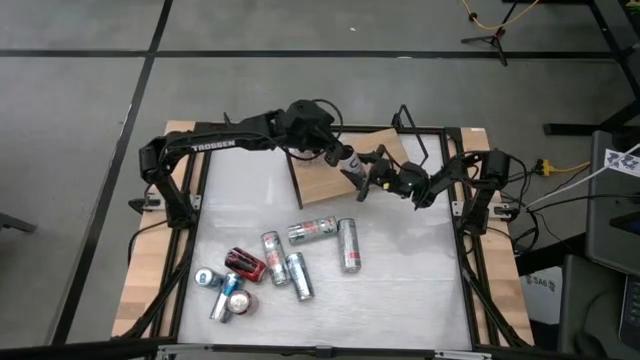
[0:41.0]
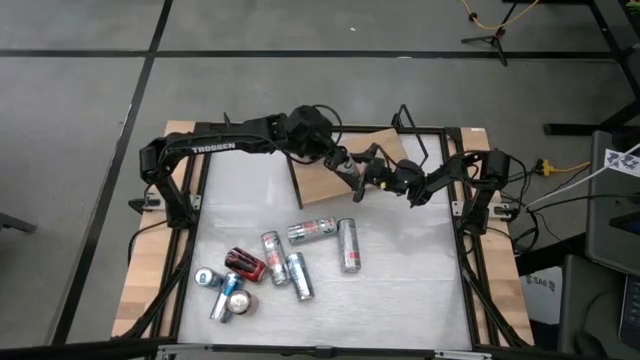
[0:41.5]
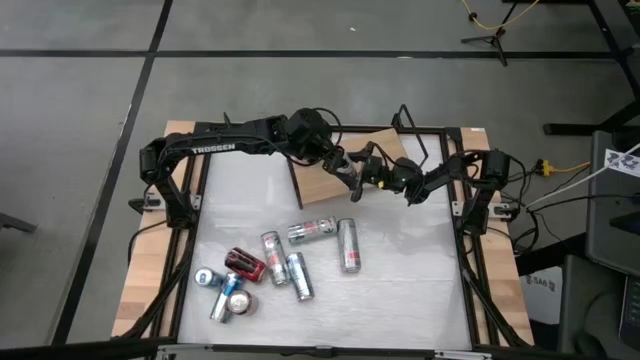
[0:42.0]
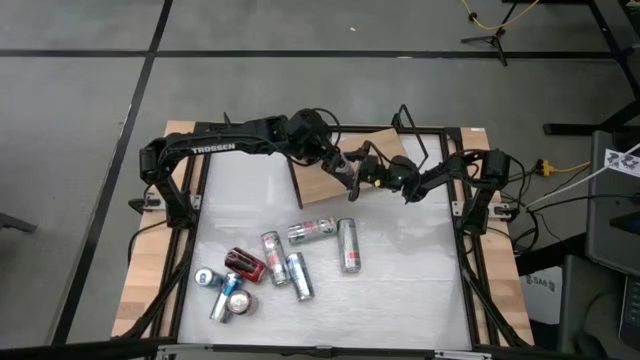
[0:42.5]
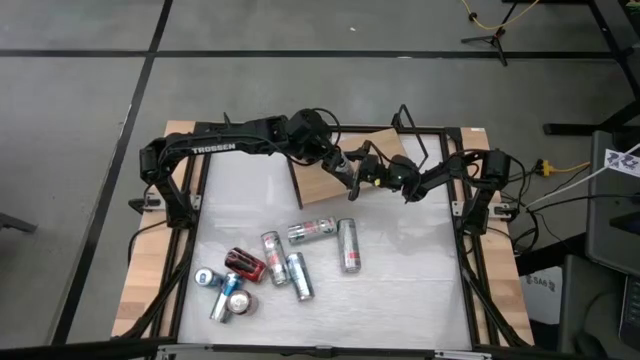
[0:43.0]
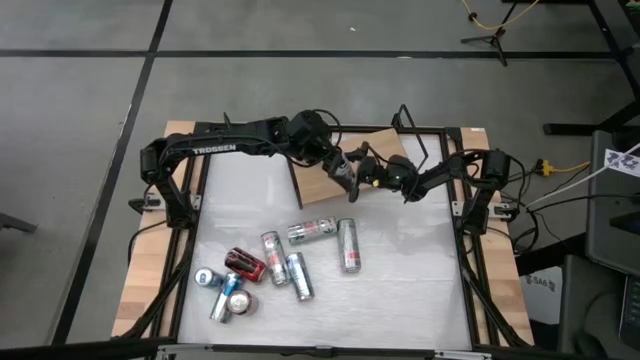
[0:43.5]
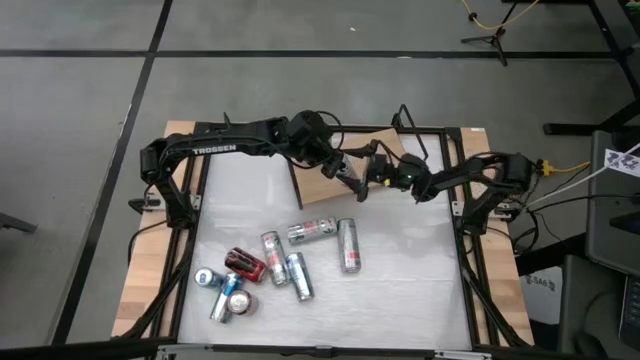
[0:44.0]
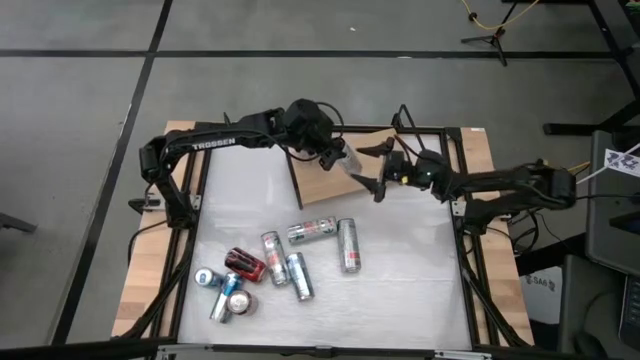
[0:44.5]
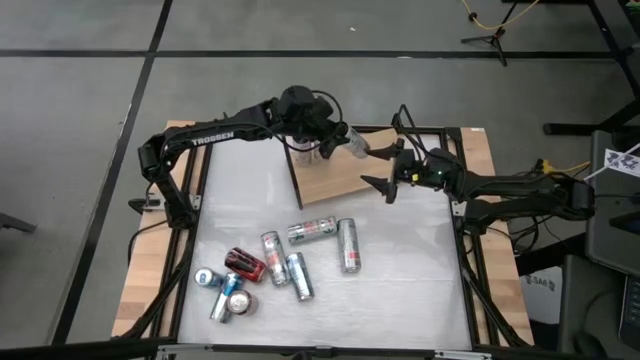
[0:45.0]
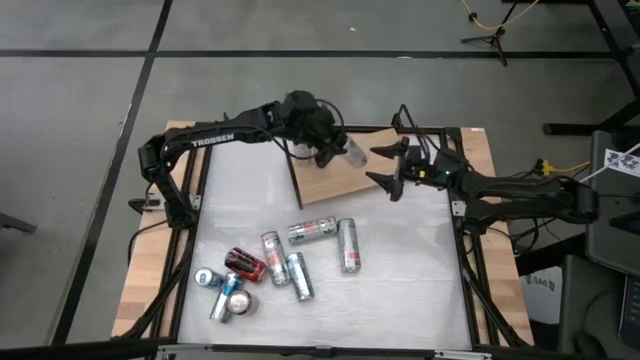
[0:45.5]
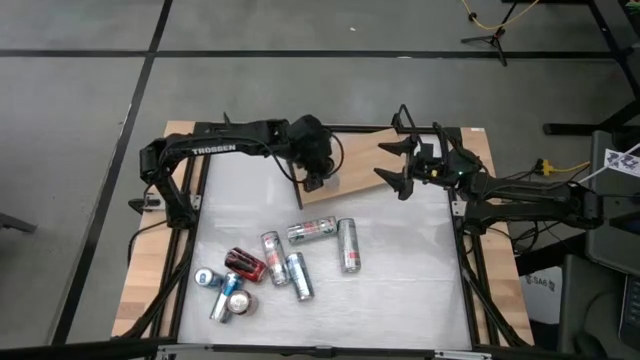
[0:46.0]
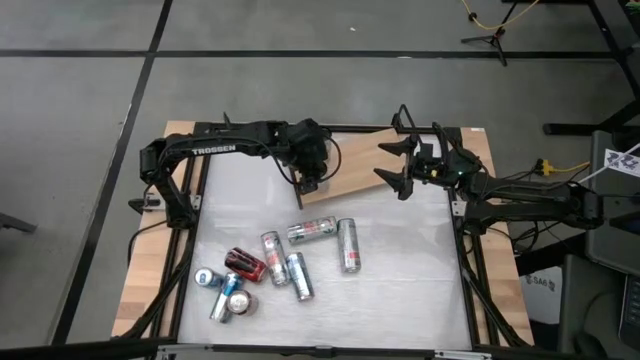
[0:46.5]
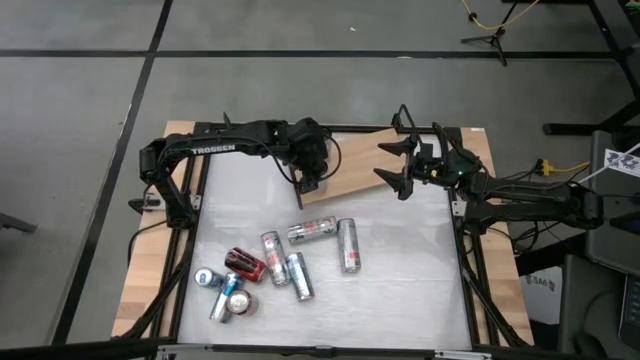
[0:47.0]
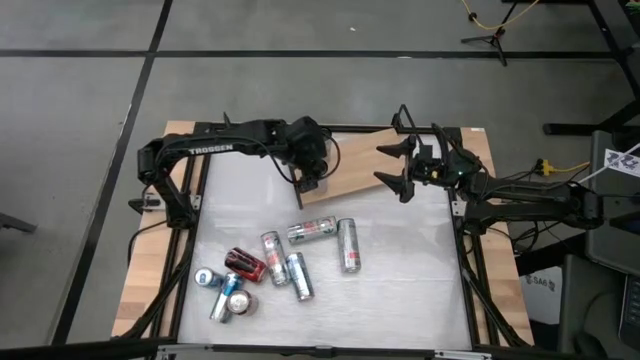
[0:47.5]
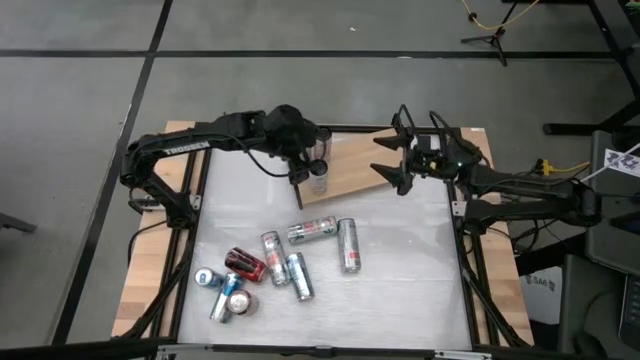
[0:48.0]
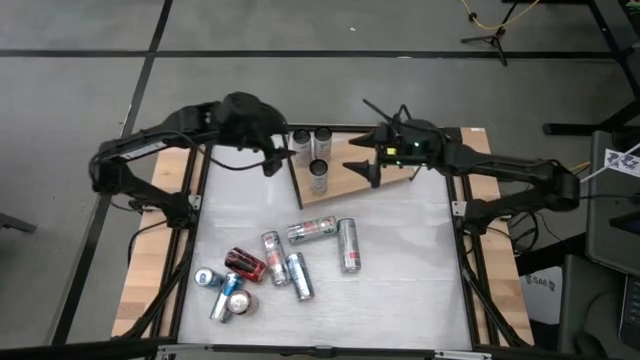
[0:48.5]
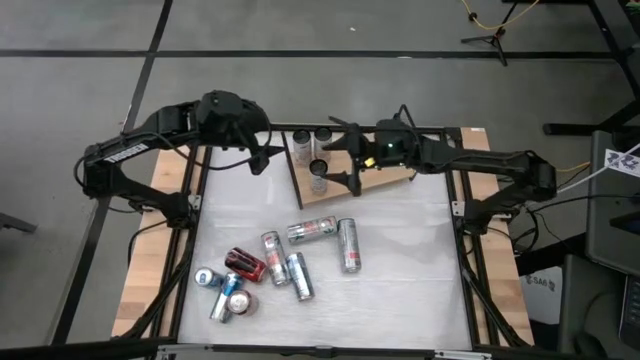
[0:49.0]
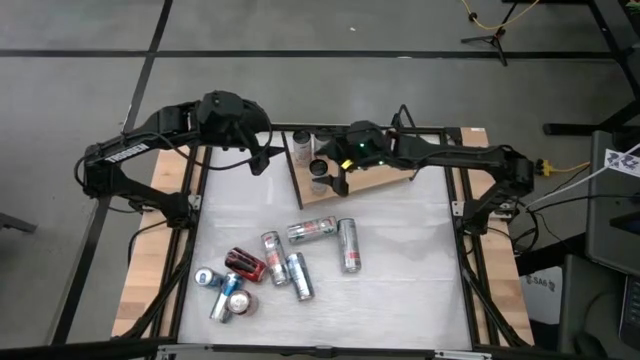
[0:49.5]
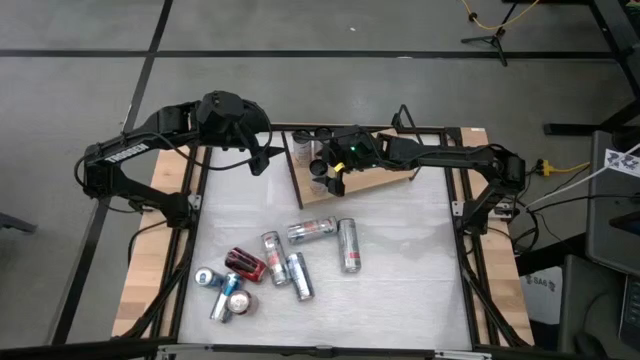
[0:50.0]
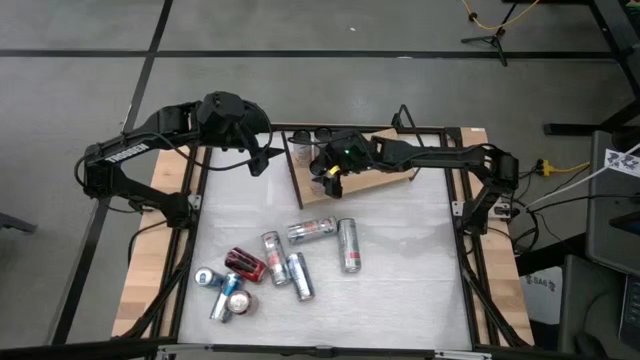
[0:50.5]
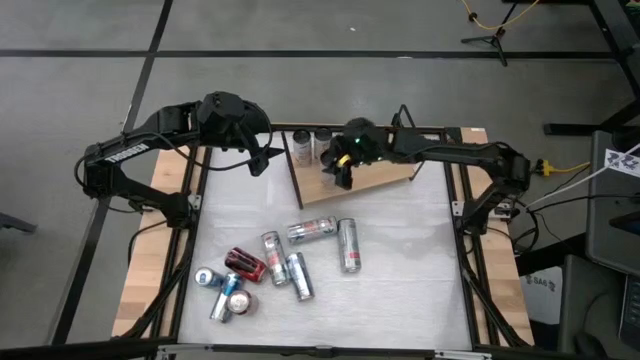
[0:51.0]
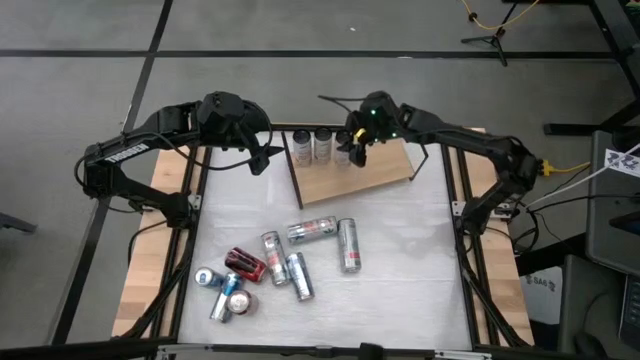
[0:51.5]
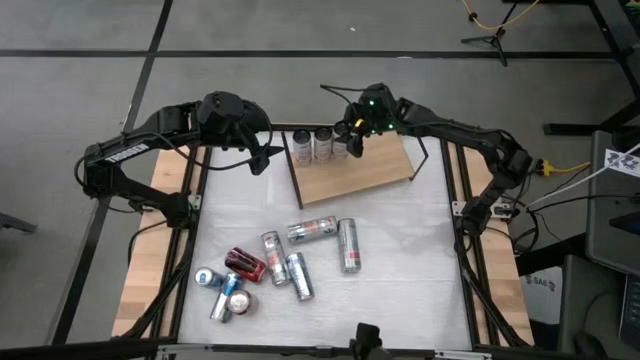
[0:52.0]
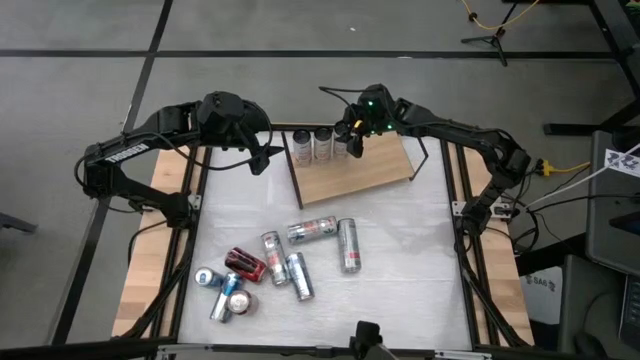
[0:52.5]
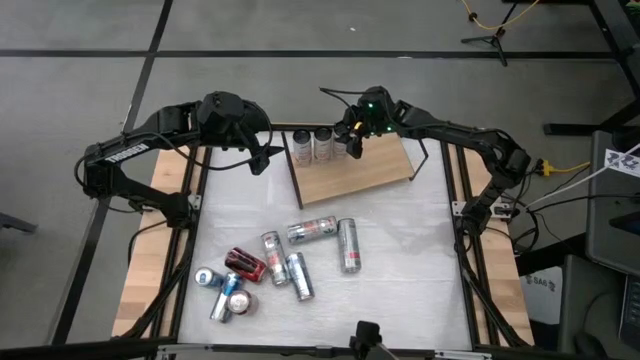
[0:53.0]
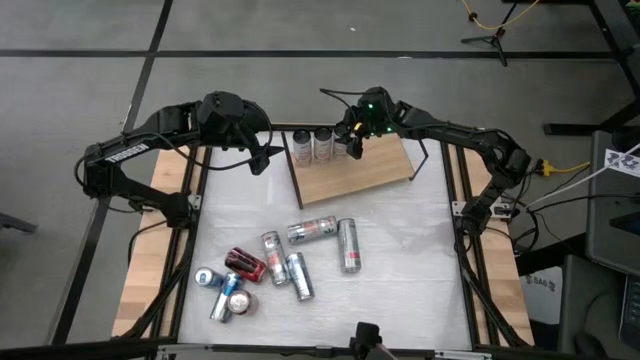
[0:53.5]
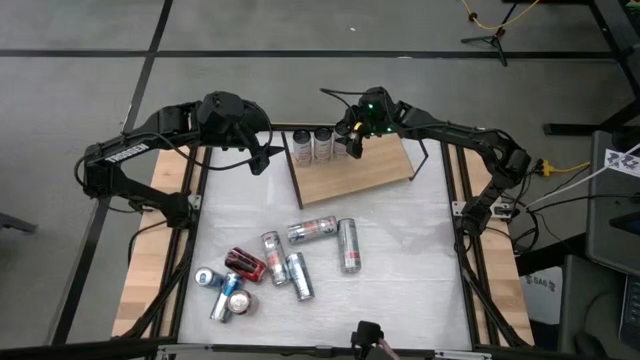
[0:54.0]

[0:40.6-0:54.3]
Task: Place canned beverage on shelf
Put the white pink soda can on the shelf aligned with the other white pink soda cans

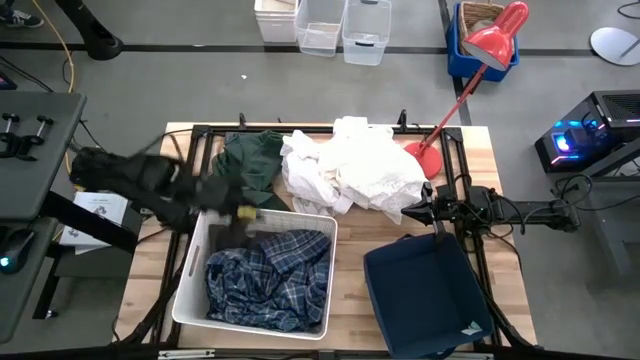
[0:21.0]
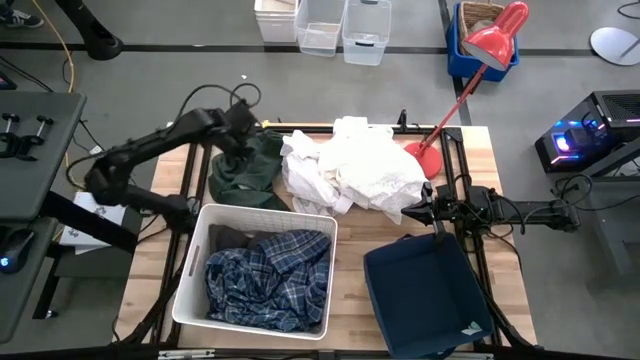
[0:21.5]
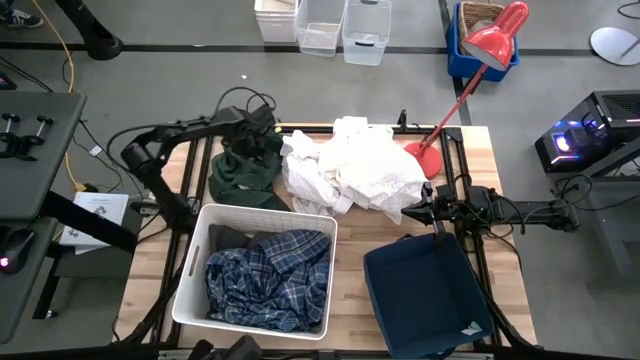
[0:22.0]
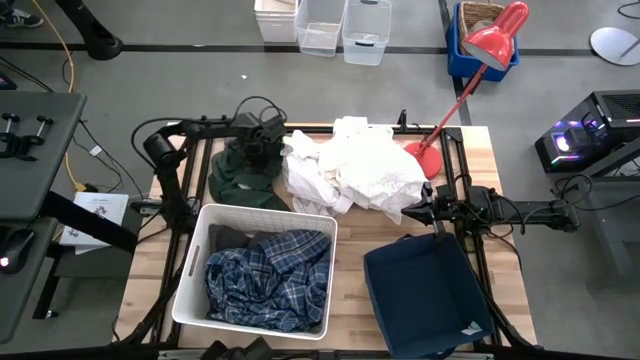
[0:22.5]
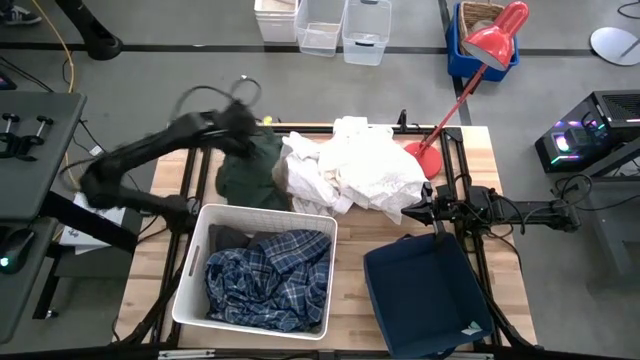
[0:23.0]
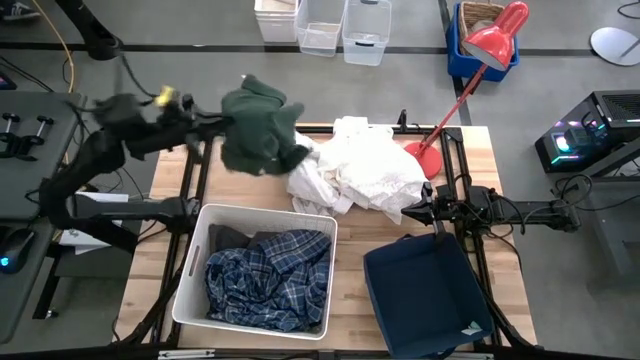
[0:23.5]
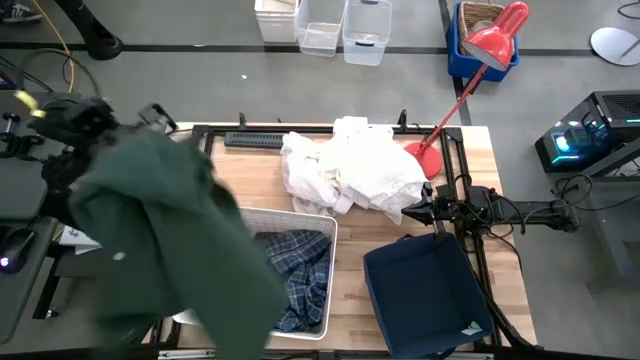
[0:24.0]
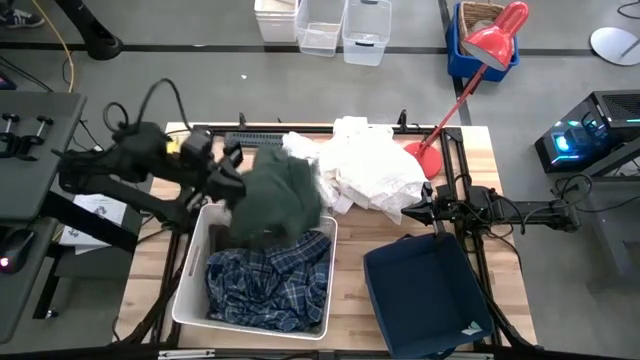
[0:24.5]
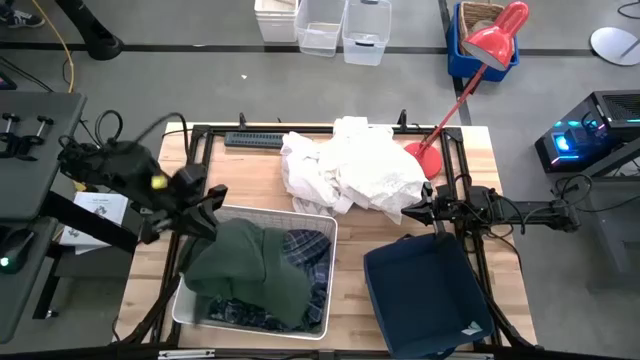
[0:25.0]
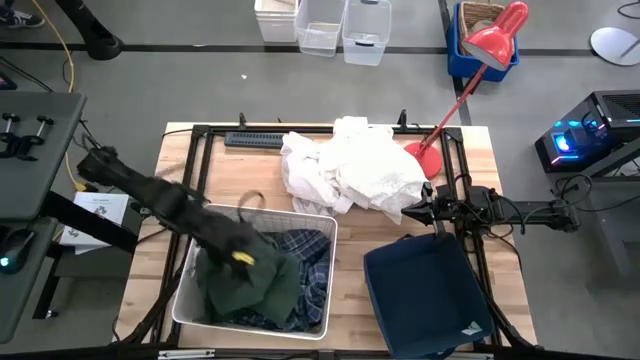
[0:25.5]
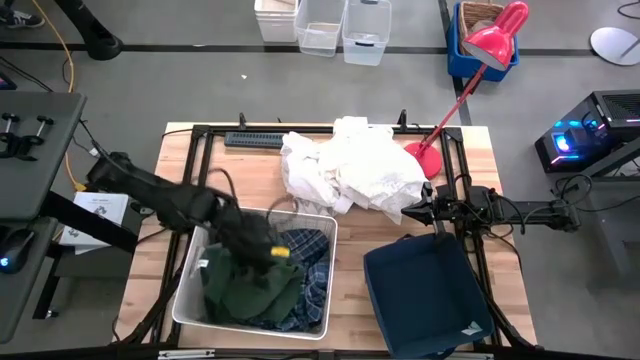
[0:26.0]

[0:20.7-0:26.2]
Task: Sort clothes
Put the green shirt into the white bin

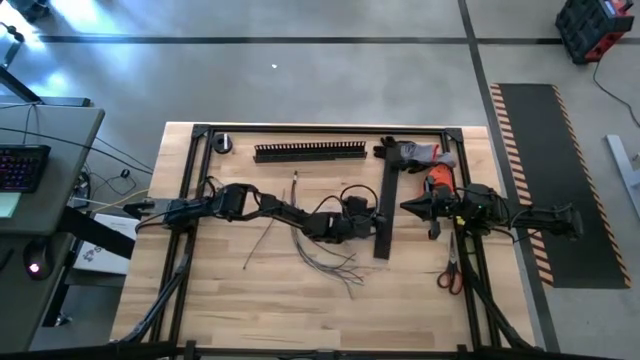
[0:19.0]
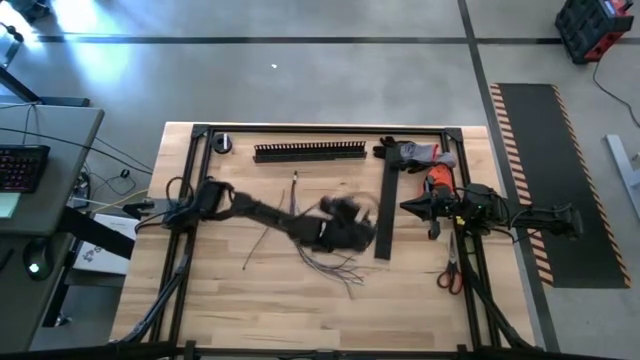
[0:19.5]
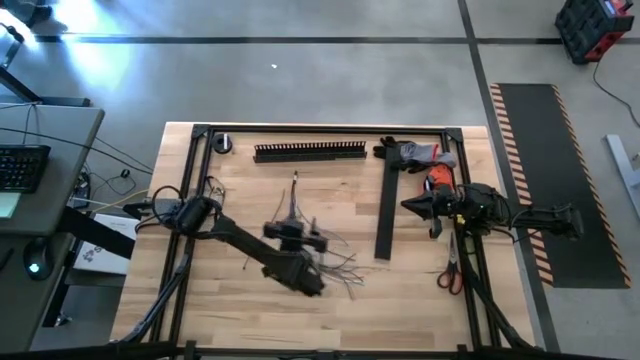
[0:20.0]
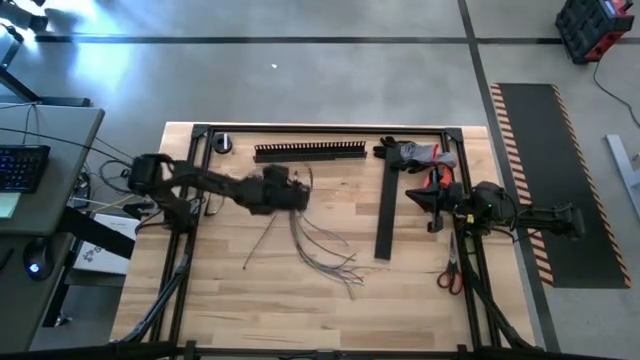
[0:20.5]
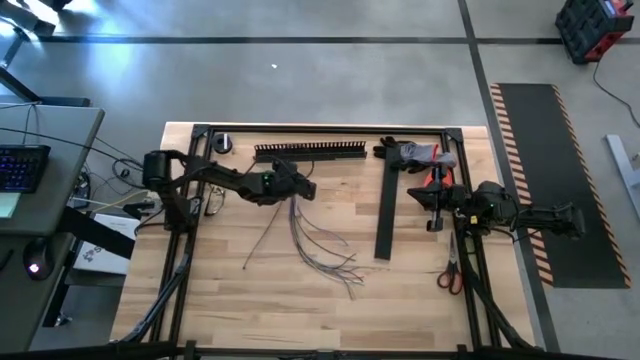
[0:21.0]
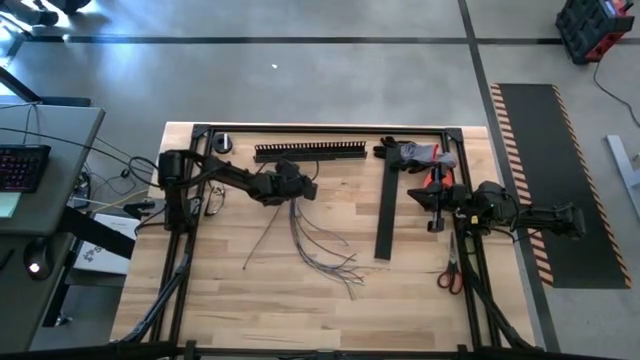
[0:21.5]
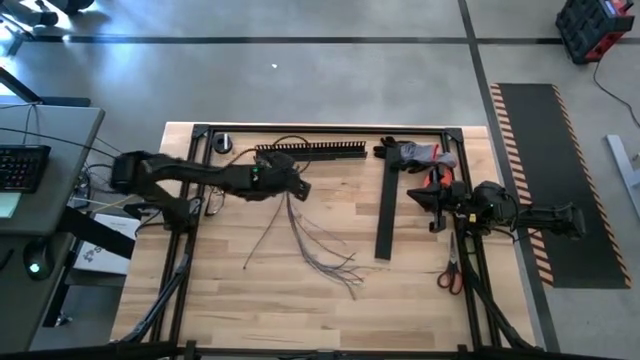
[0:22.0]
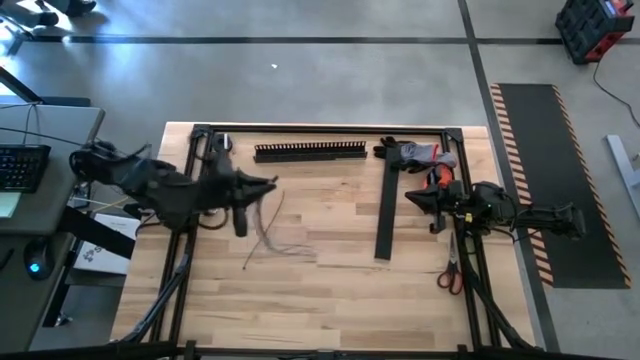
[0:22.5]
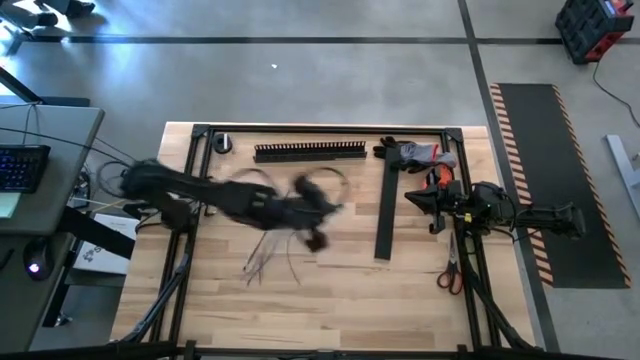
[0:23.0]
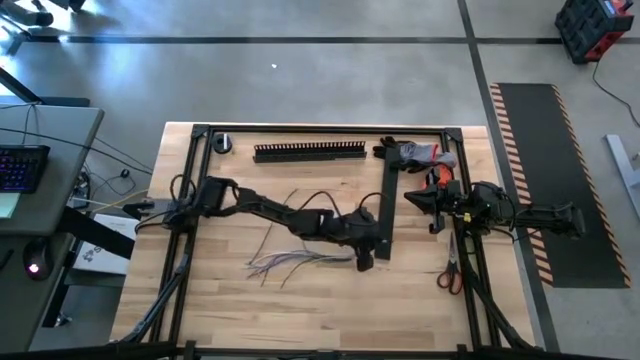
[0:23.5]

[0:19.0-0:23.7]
Task: Ziptie cables
Prepare the cable wires
